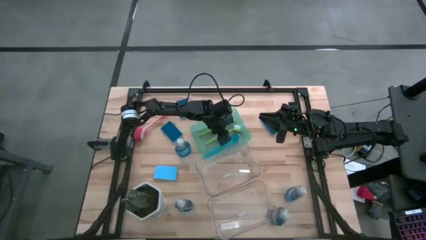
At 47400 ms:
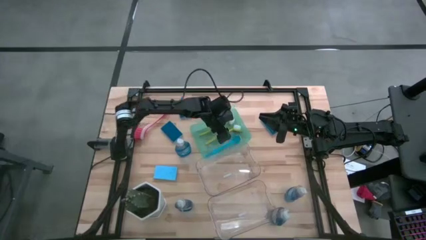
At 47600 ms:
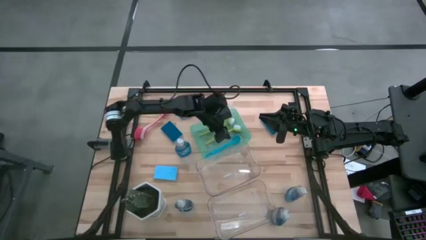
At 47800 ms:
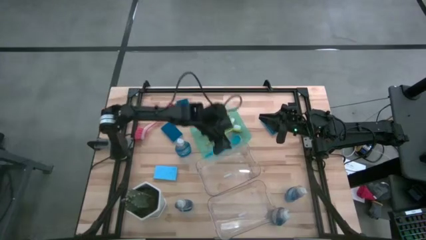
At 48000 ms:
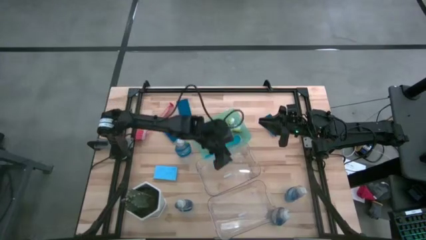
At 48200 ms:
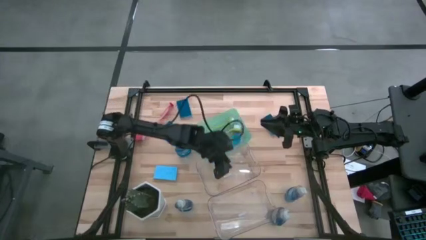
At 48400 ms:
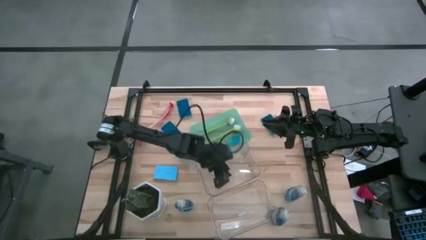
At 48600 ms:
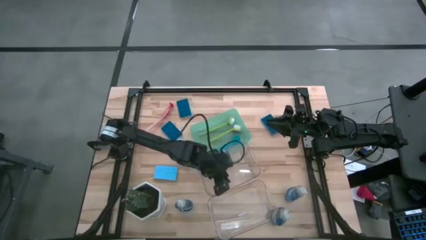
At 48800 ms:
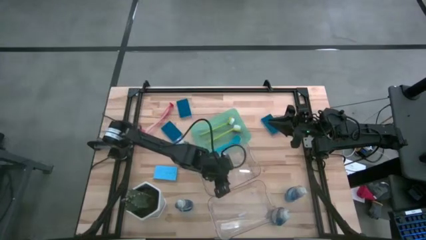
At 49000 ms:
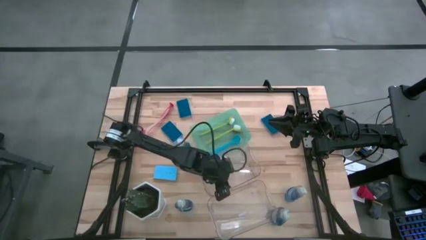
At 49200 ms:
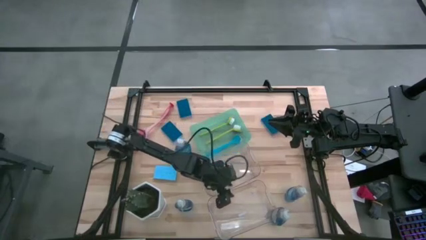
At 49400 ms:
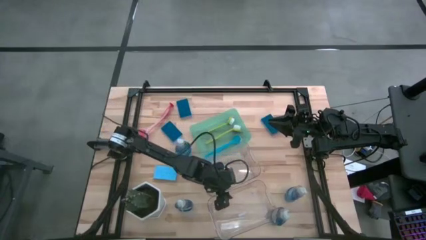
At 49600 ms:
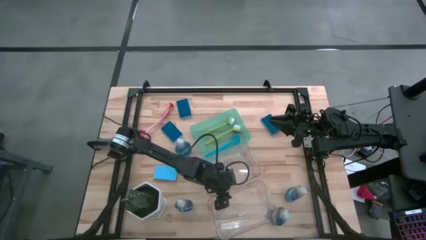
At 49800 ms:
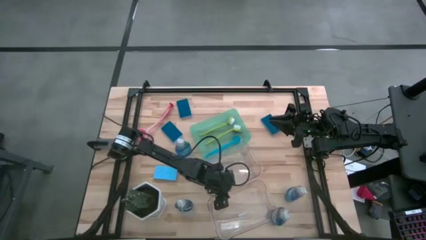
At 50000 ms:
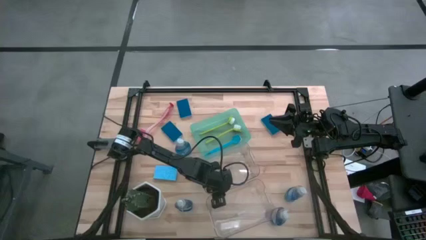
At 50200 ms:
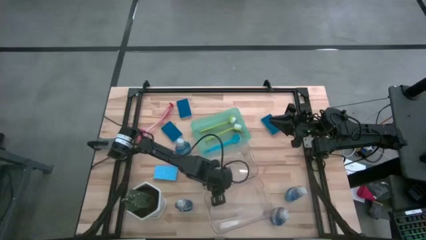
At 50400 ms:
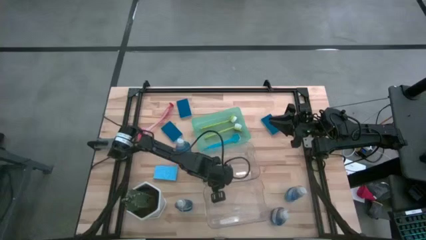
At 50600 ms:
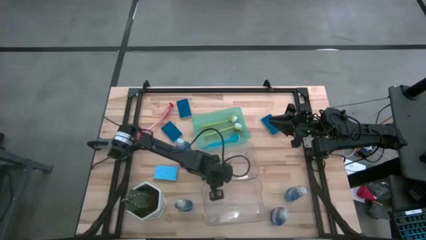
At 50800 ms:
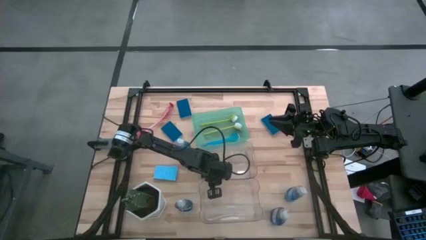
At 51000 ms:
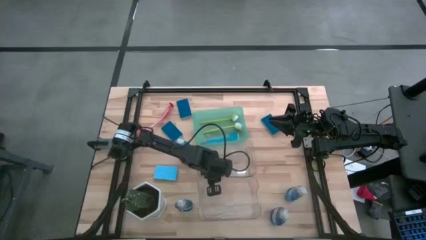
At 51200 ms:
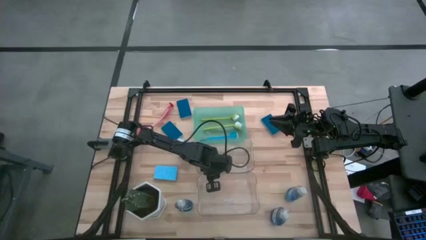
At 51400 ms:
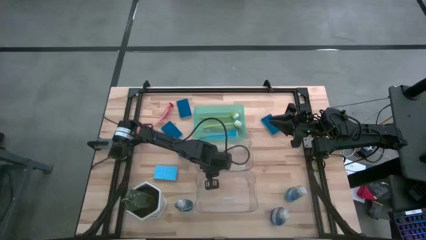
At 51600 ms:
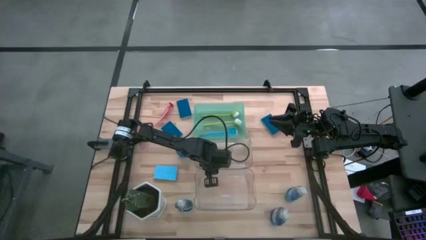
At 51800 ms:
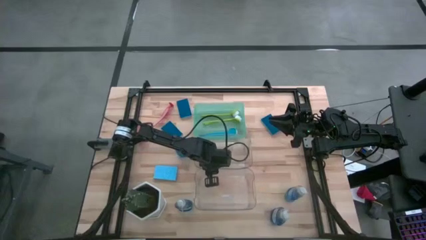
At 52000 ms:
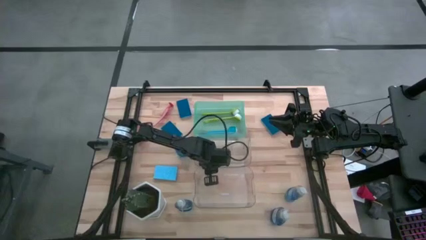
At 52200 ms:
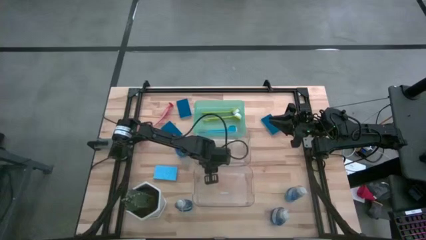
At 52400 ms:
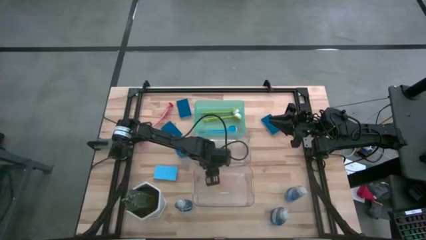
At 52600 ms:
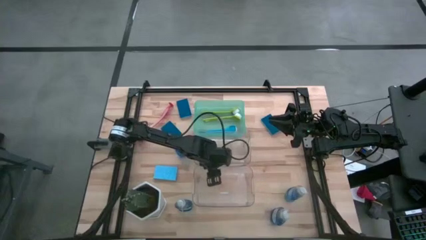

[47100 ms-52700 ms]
Task: Pick & Place Kitchen Sink Supplies
Adjust the bins

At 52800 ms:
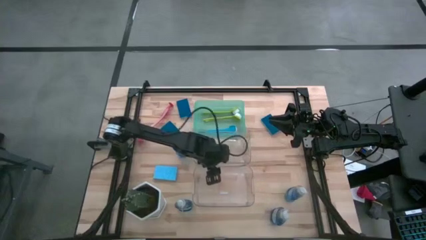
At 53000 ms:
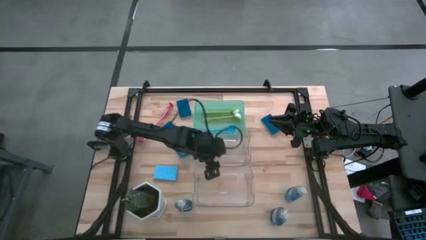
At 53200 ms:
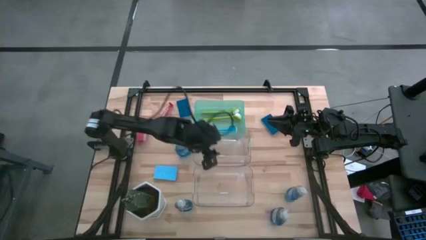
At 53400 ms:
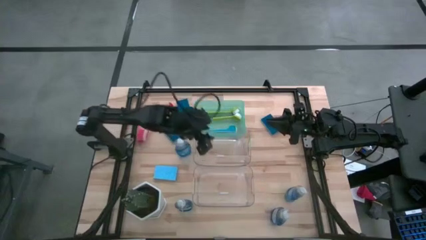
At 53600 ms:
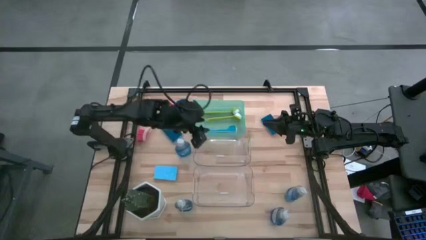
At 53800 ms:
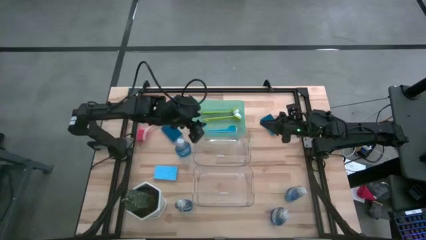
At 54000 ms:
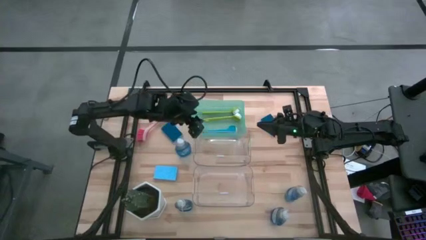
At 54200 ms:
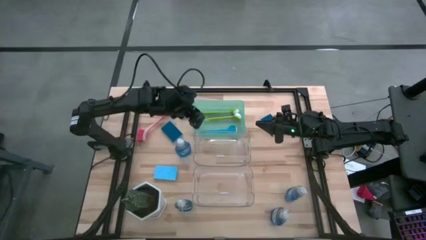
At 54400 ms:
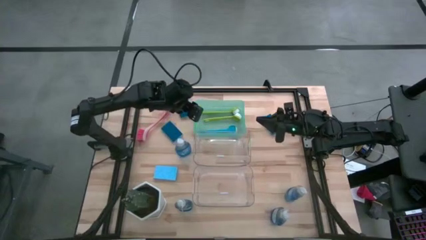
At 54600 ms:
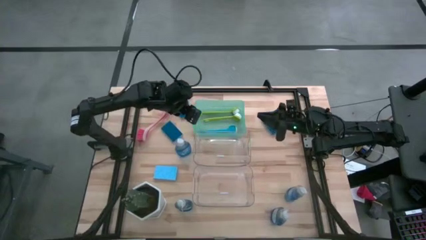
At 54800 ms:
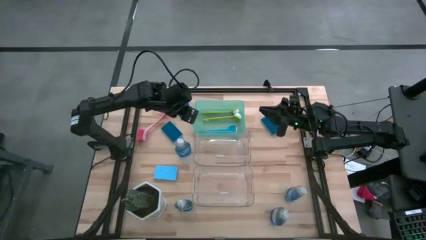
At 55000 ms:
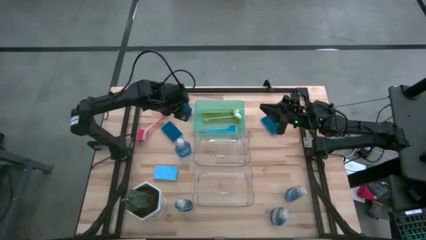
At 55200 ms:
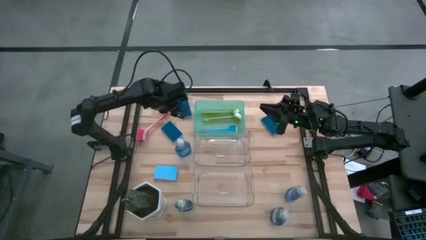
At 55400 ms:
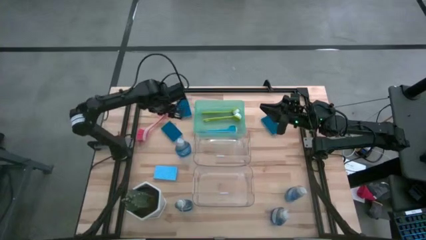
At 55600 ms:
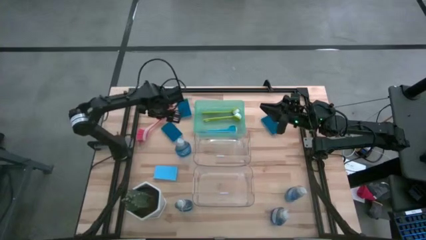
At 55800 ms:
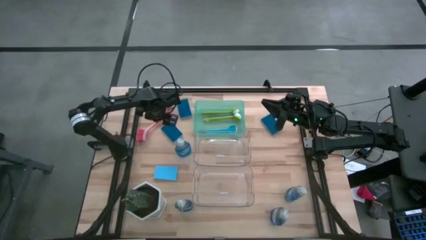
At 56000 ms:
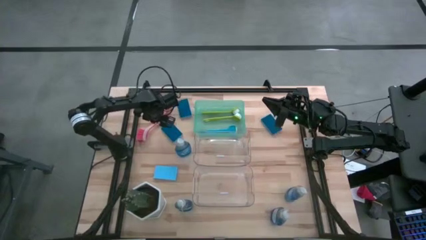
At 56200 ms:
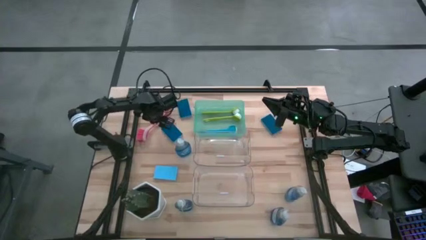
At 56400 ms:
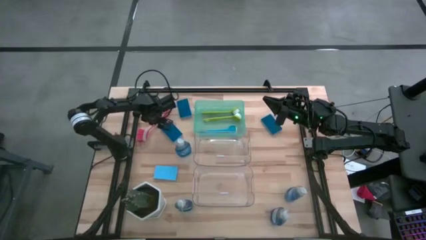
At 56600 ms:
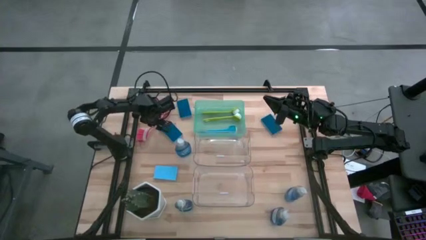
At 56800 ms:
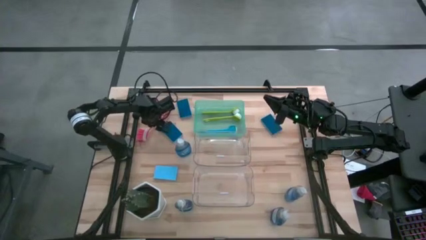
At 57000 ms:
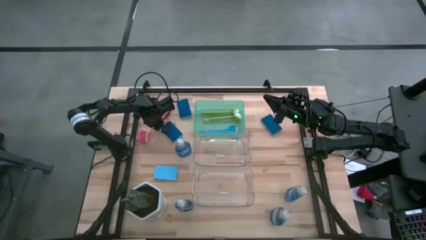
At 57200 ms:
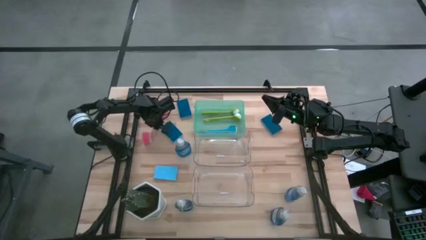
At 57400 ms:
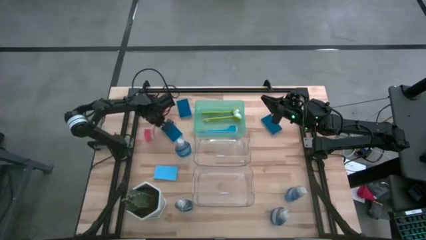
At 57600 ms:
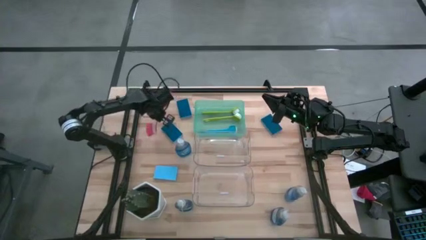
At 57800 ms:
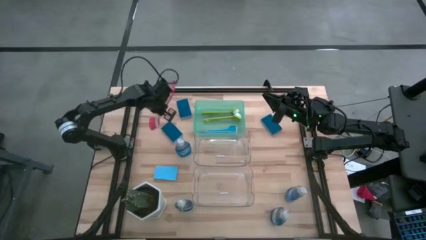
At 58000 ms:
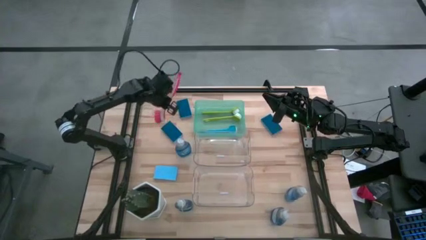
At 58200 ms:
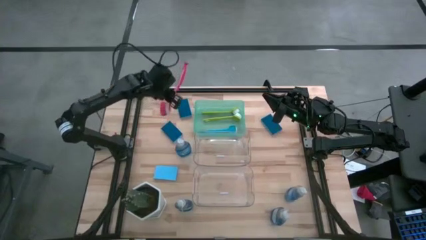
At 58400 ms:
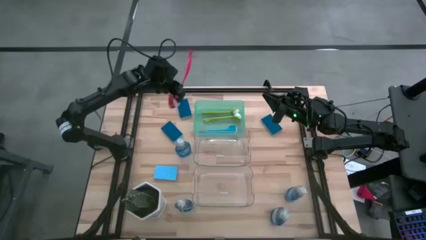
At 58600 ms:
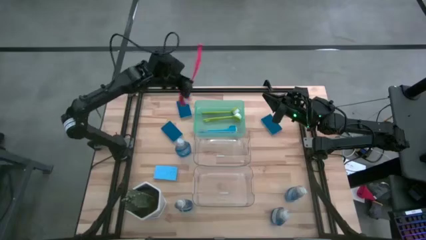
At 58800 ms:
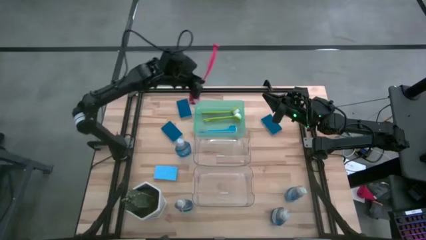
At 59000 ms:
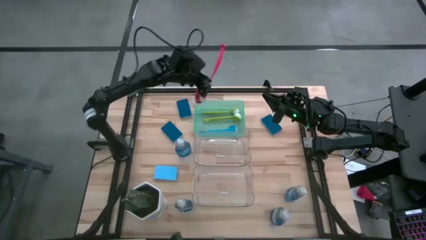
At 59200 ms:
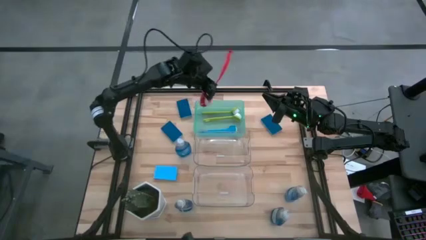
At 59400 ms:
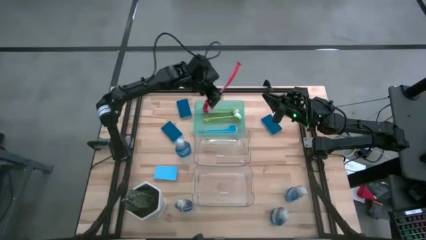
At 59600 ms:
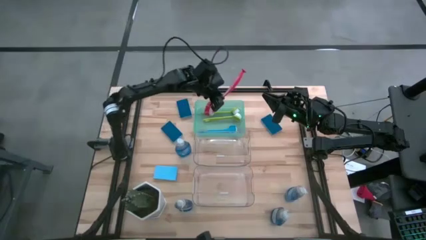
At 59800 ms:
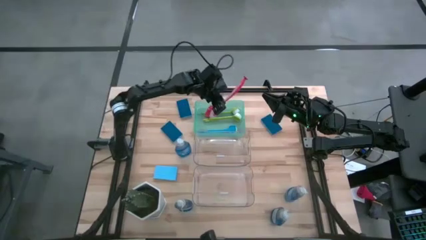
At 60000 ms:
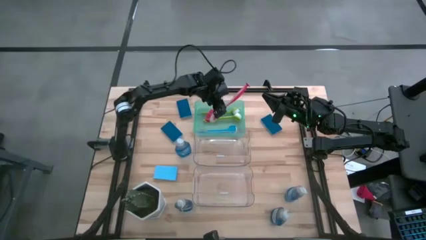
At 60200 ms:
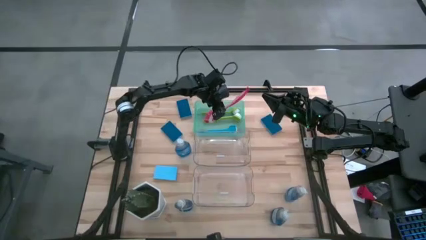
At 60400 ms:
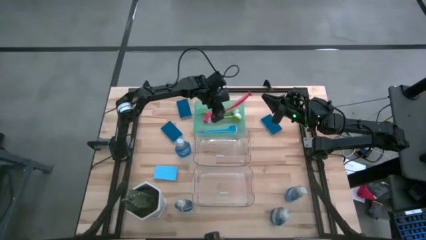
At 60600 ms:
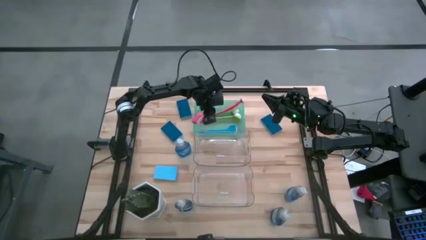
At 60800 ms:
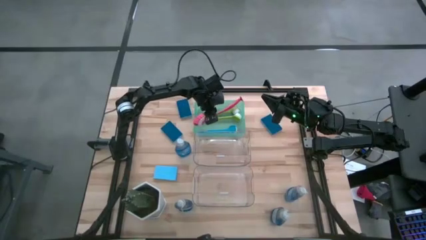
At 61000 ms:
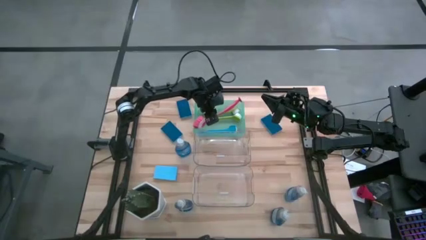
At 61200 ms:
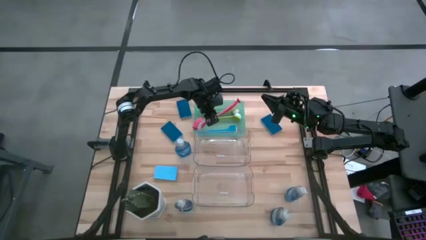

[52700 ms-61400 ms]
Put the pink dish brush into the teal bin

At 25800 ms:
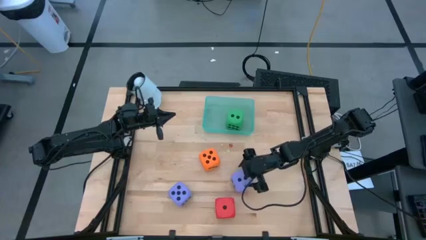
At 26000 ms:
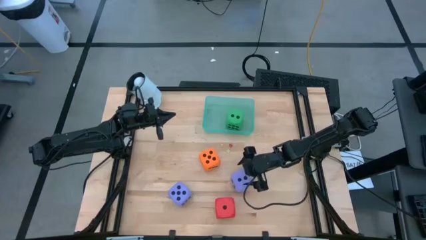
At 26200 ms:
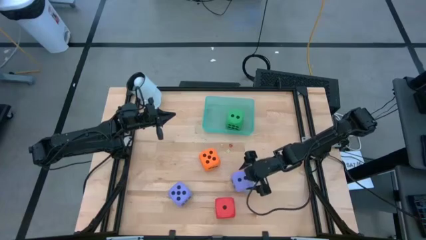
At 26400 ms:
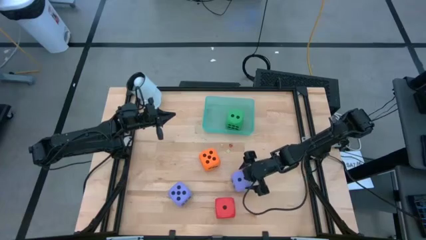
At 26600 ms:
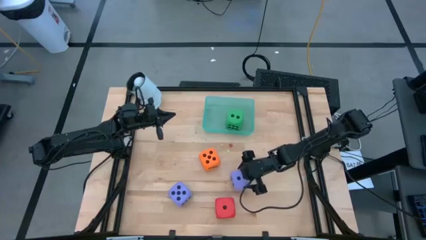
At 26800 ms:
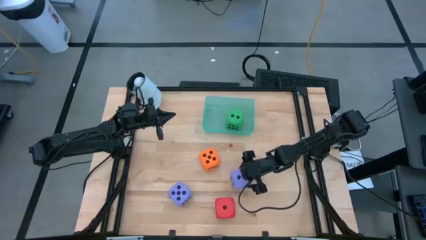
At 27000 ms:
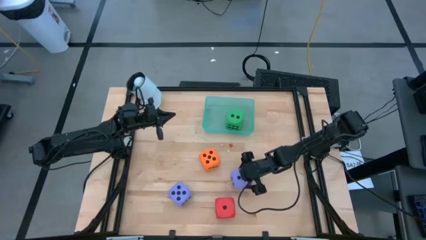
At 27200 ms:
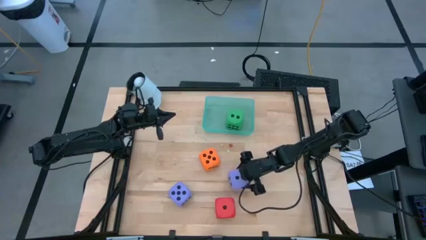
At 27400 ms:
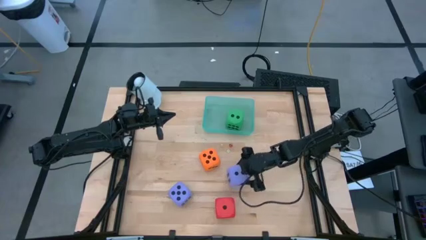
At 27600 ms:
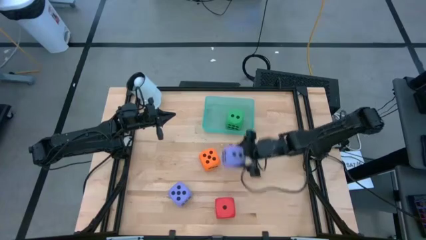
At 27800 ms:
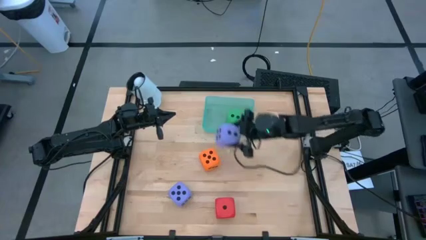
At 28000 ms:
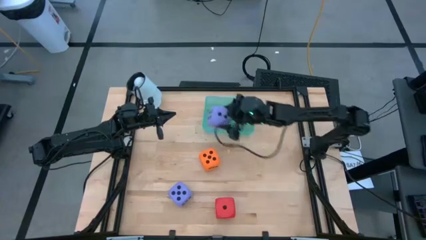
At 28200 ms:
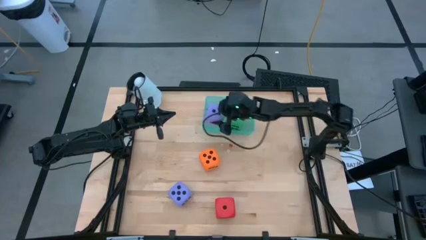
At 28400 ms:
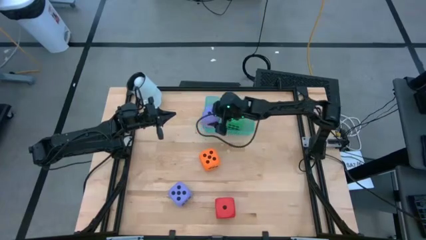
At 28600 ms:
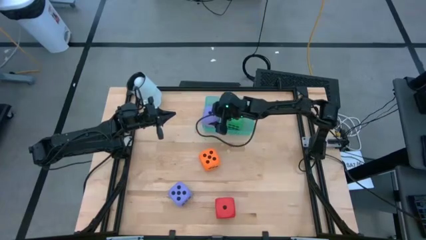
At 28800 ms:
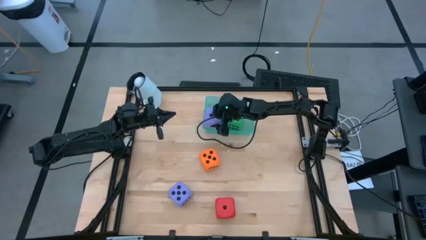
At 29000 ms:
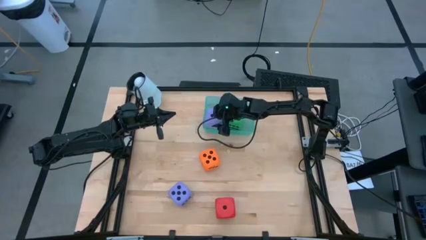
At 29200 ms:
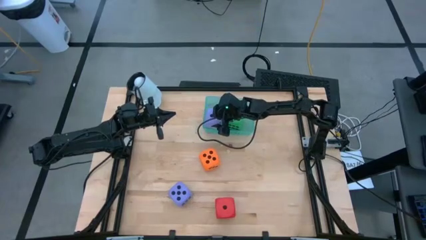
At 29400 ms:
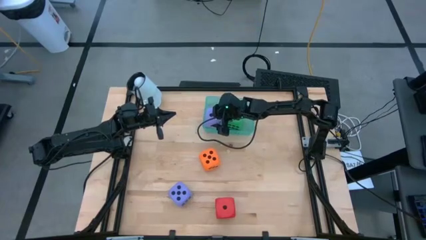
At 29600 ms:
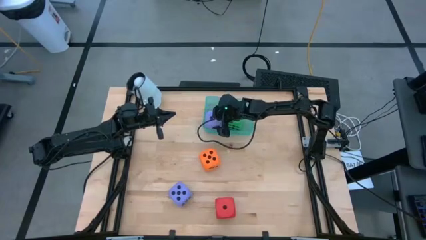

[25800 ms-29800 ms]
Task: Pick & Place Dice
Put the large right purple dice into the light blue bin
